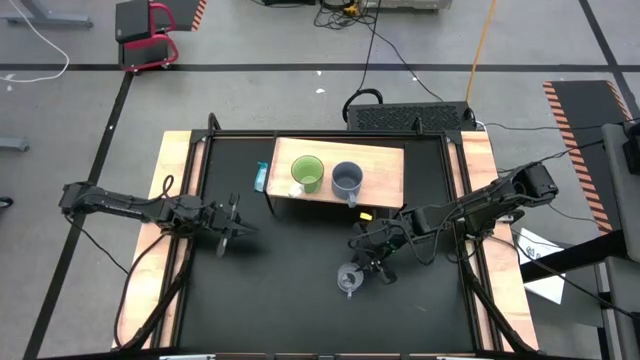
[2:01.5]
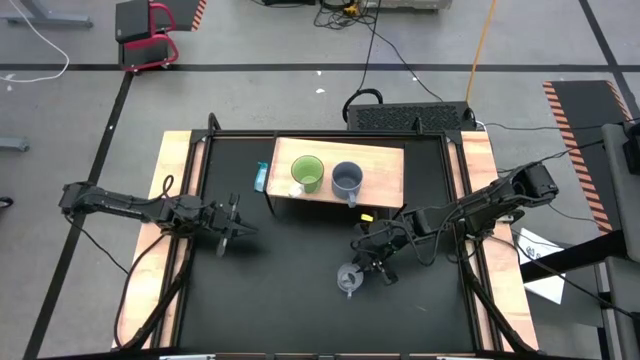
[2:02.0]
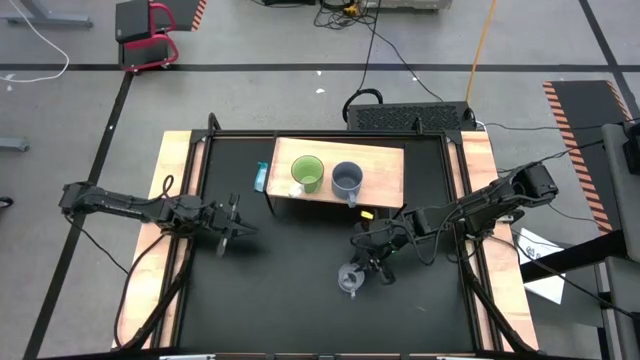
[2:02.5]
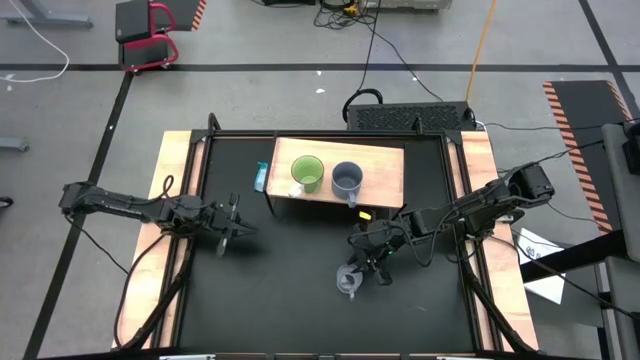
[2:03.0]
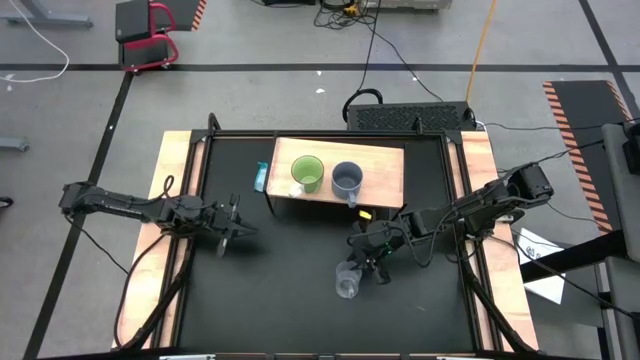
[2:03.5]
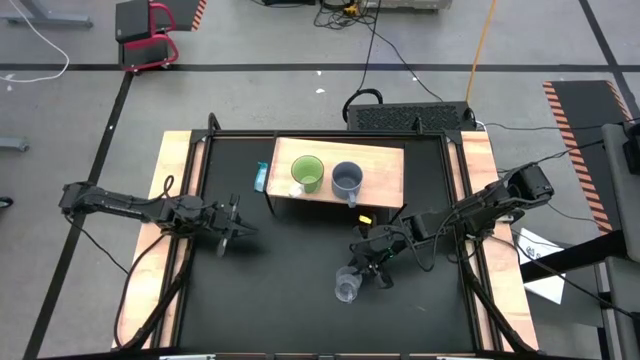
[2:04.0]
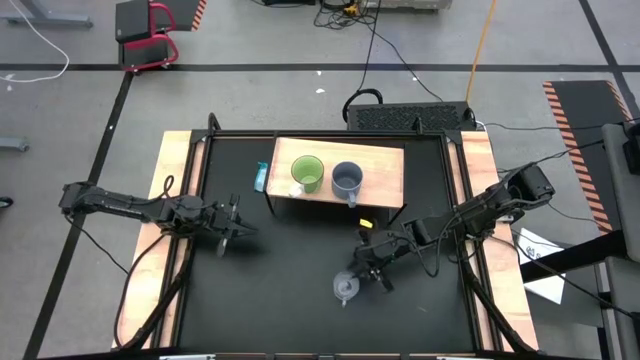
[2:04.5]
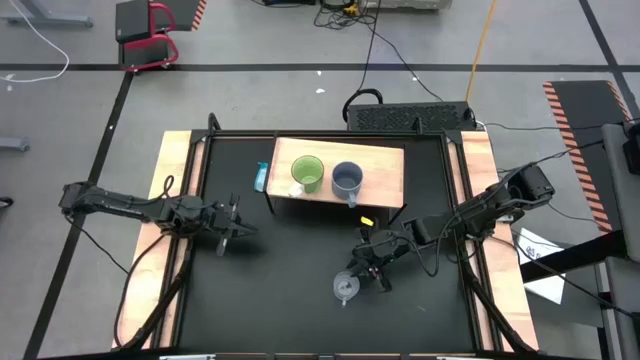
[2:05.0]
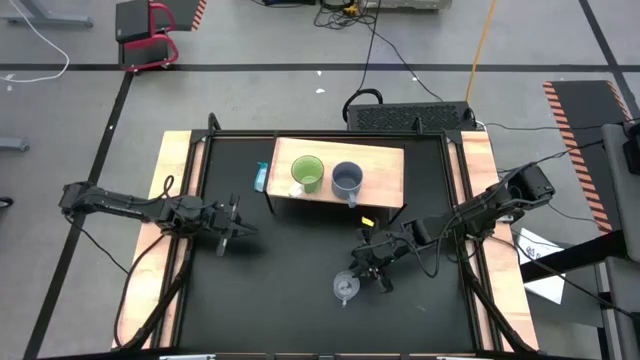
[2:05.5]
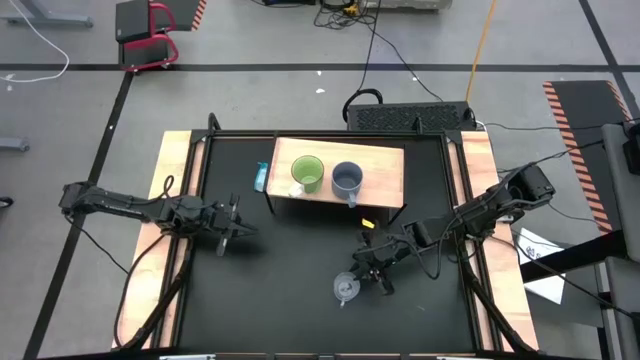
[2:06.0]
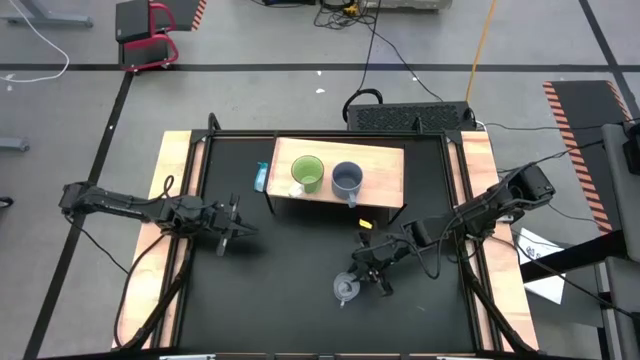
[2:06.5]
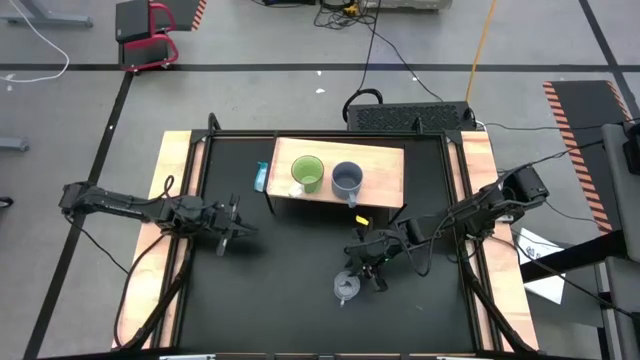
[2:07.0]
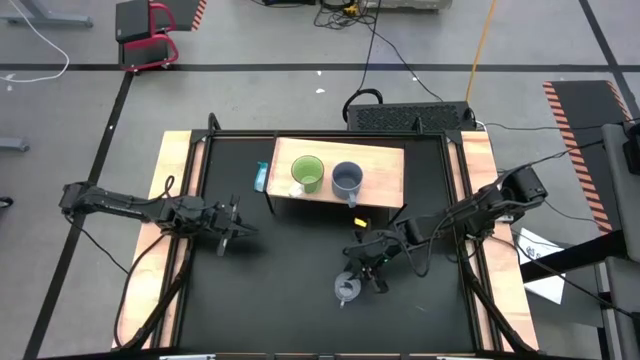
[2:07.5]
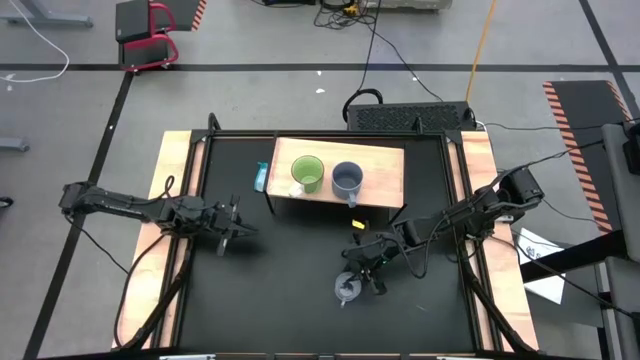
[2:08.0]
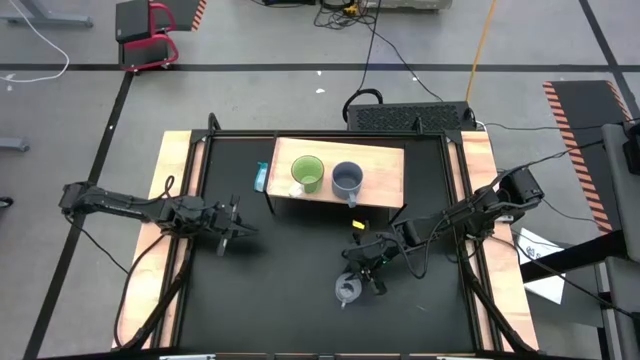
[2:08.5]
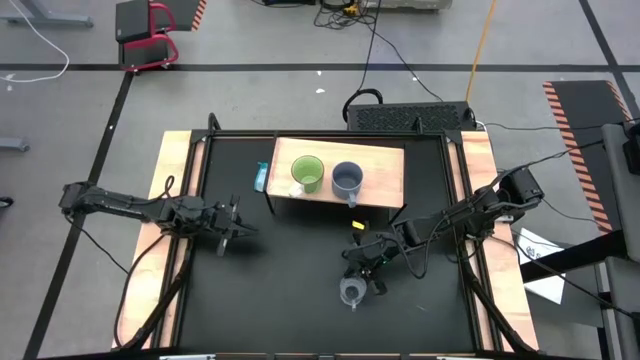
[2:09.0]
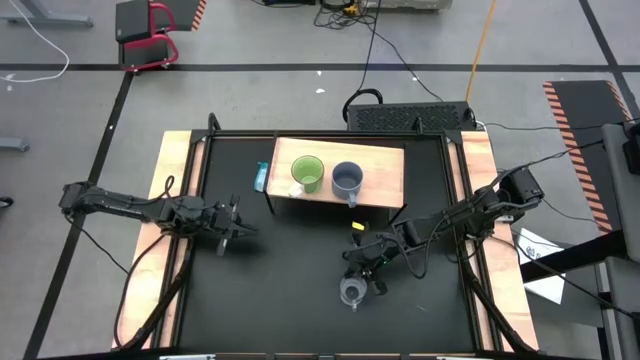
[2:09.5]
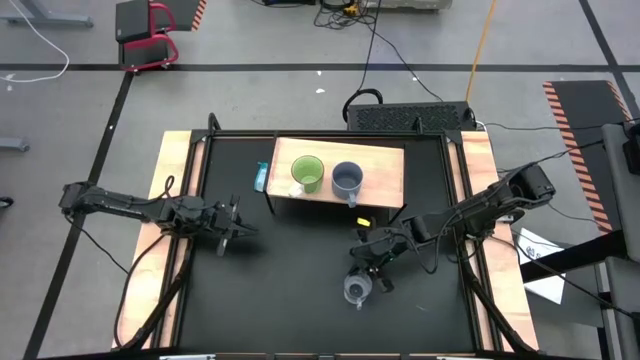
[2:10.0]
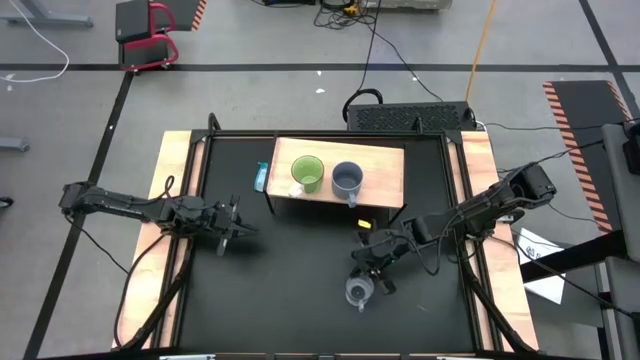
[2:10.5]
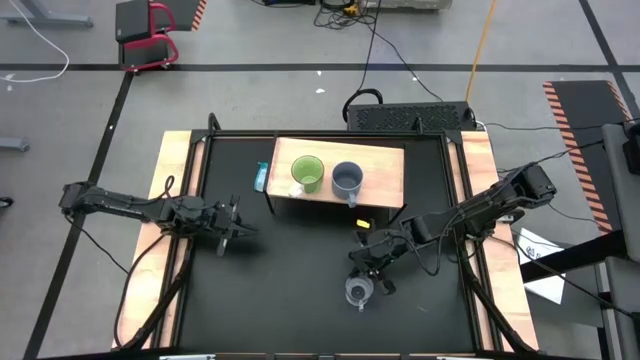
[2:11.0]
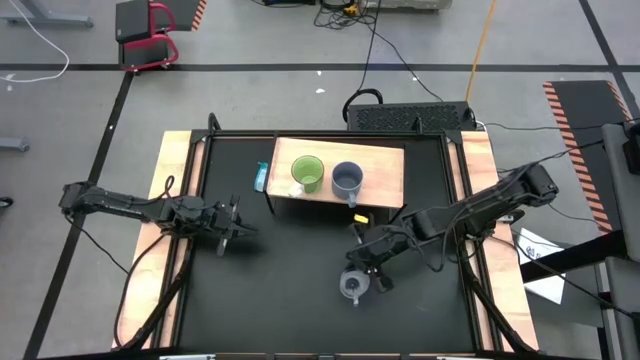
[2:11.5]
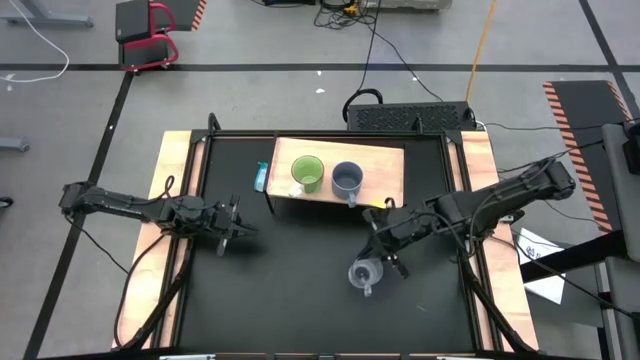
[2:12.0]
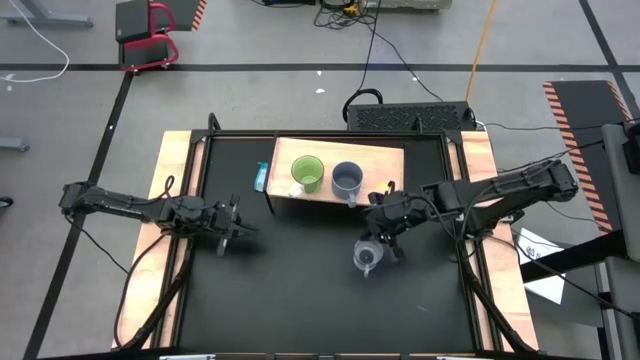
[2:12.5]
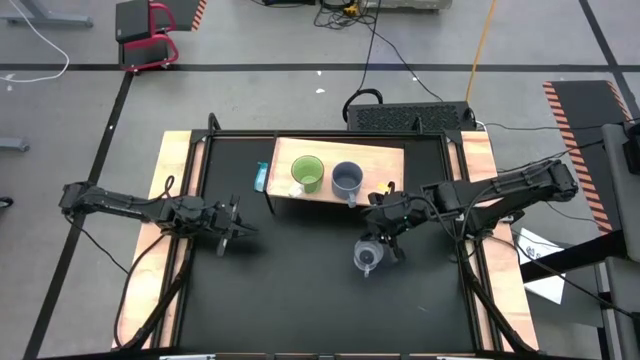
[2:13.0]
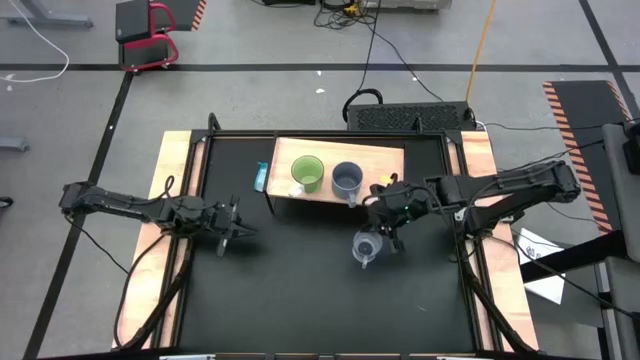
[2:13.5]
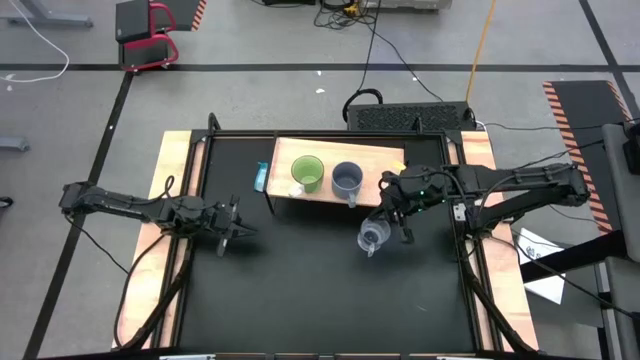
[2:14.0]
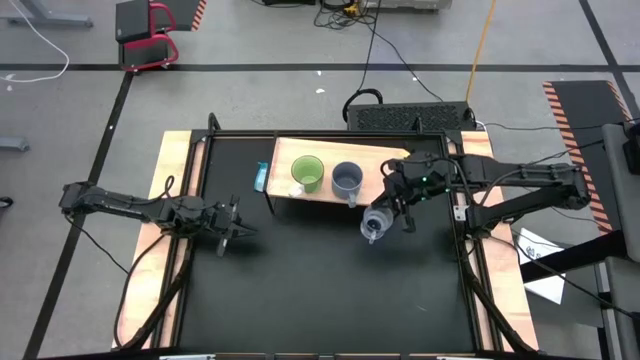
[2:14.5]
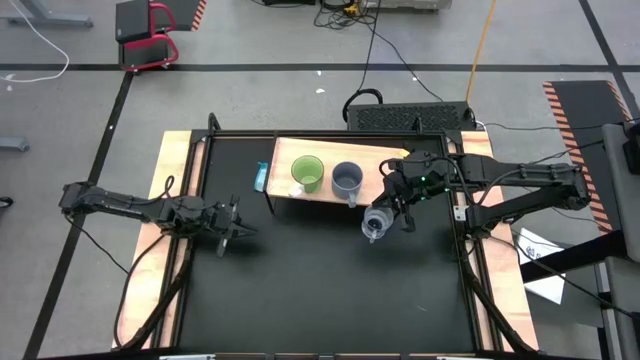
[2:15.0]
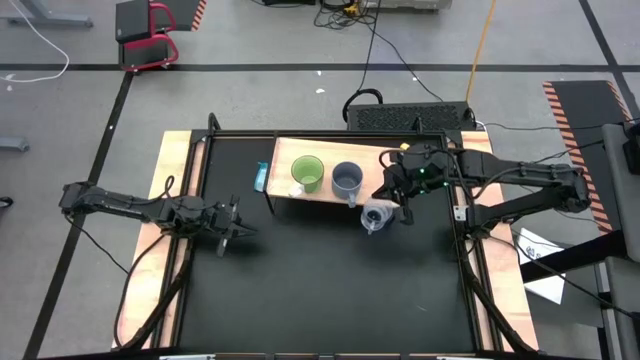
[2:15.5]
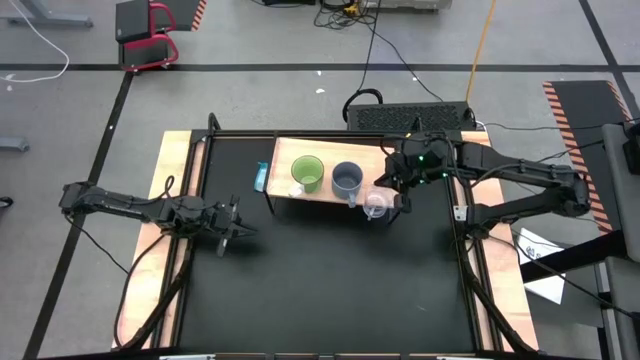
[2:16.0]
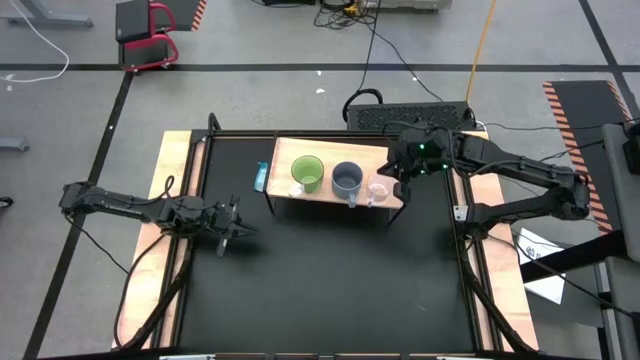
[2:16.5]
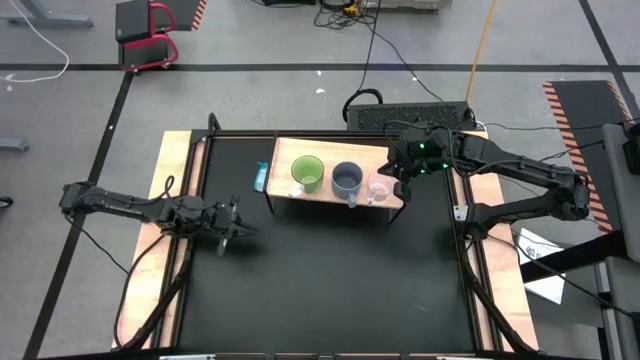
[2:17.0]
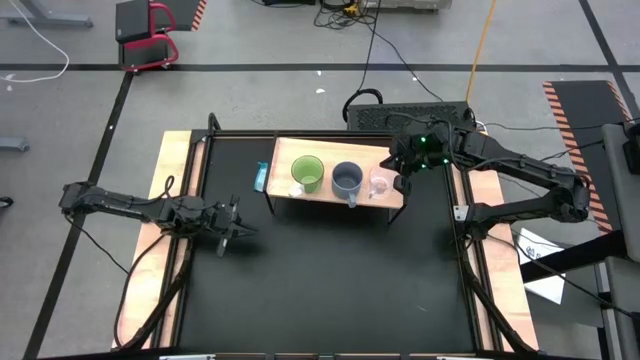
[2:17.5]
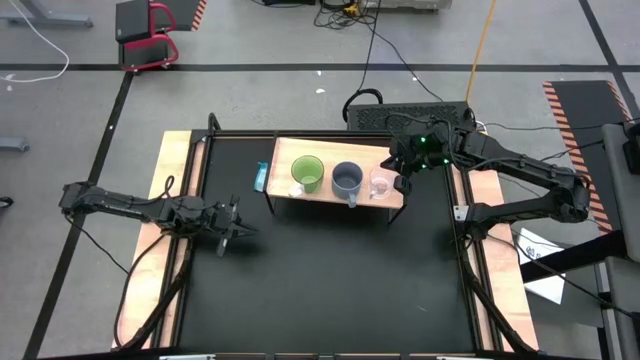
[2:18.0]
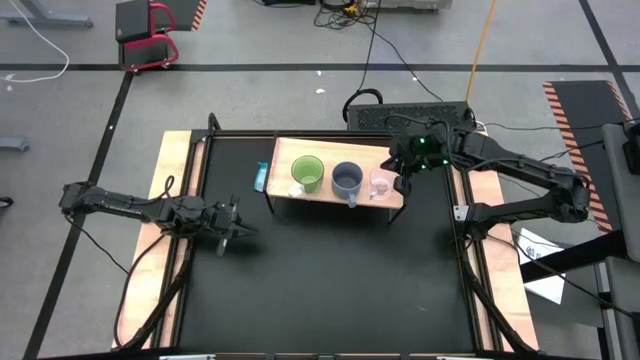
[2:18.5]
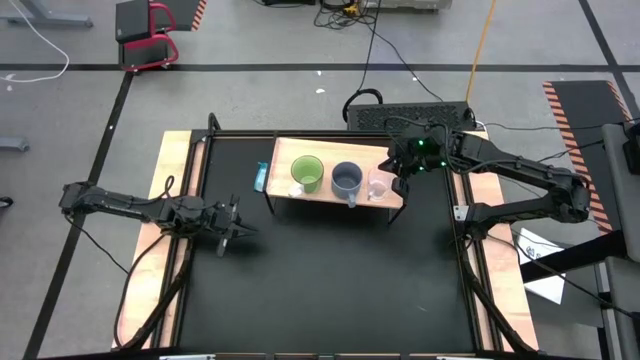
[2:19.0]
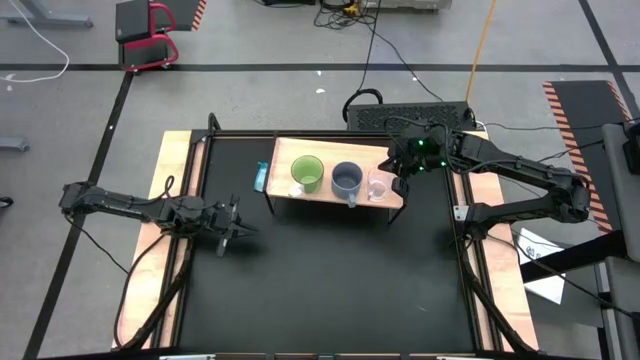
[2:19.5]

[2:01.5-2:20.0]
Task: Stack small to large cups/mugs on shelf
Put the transparent cup on the shelf
